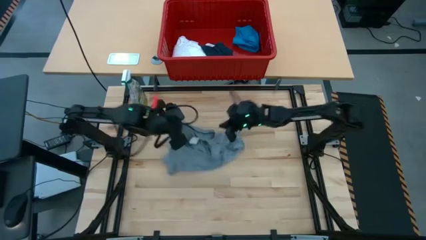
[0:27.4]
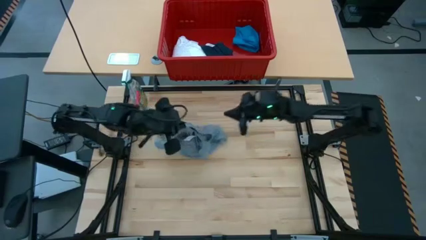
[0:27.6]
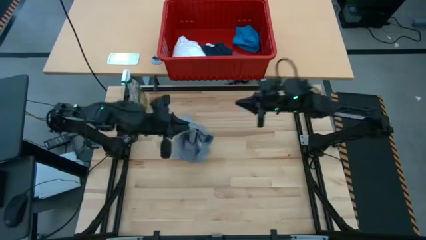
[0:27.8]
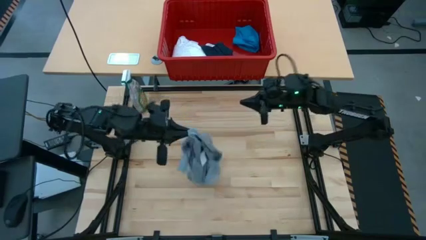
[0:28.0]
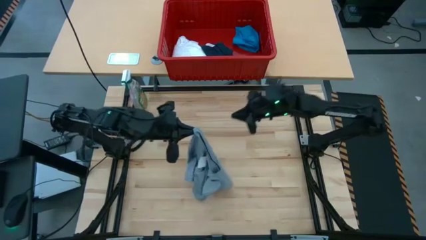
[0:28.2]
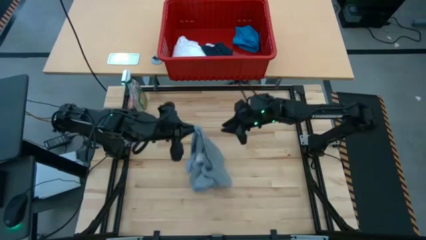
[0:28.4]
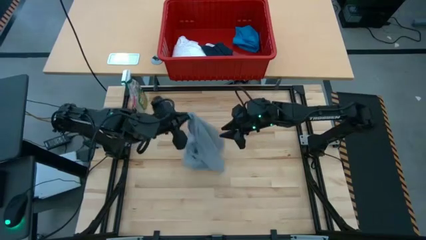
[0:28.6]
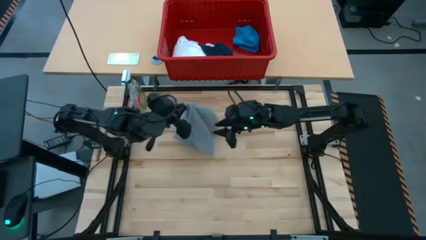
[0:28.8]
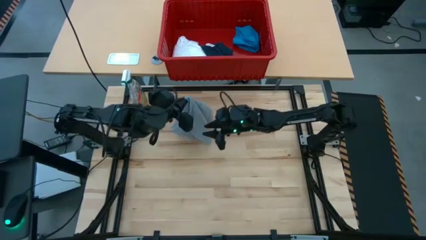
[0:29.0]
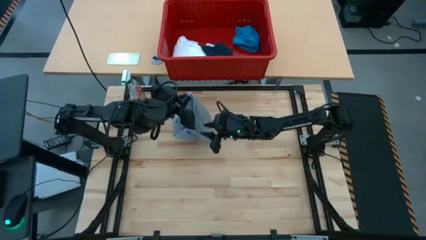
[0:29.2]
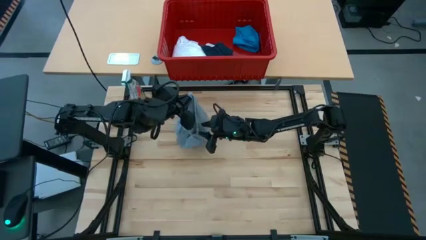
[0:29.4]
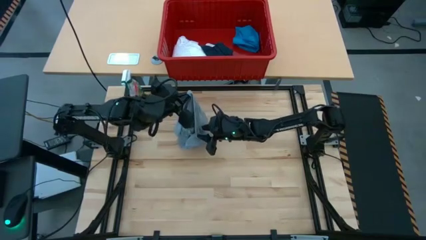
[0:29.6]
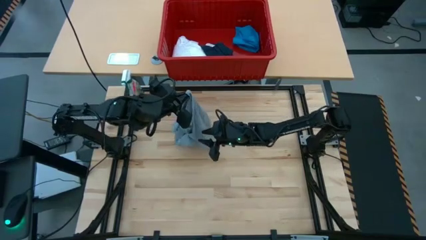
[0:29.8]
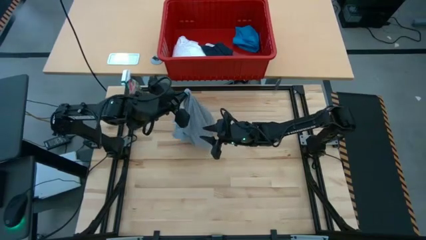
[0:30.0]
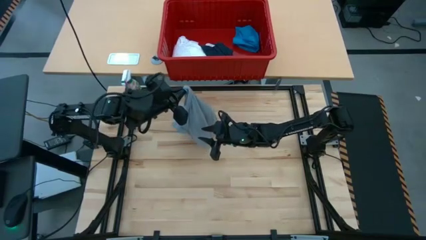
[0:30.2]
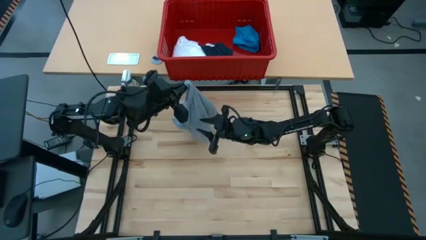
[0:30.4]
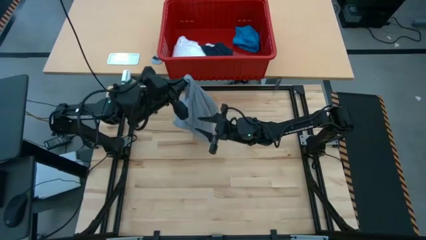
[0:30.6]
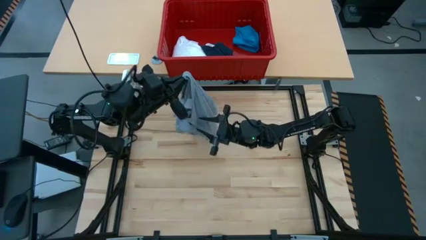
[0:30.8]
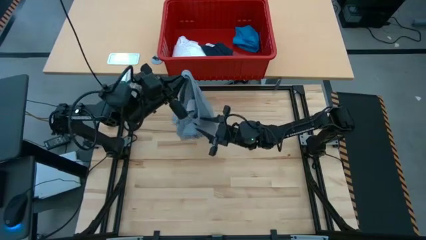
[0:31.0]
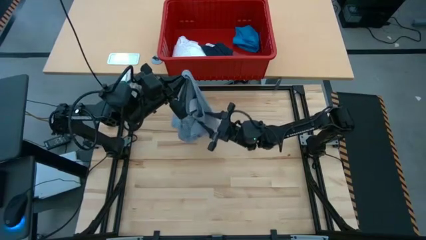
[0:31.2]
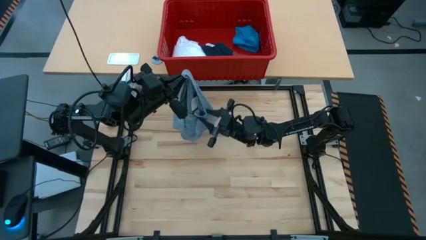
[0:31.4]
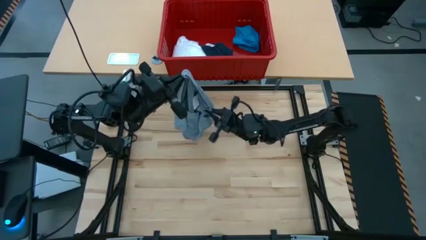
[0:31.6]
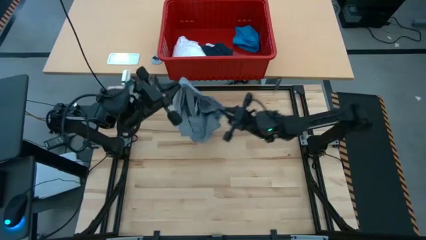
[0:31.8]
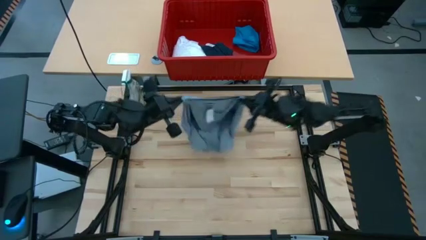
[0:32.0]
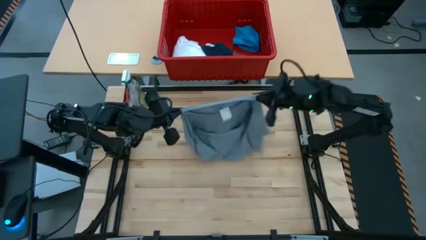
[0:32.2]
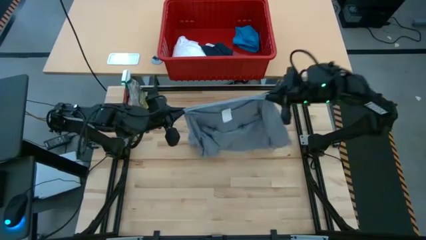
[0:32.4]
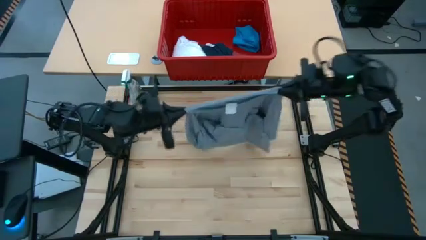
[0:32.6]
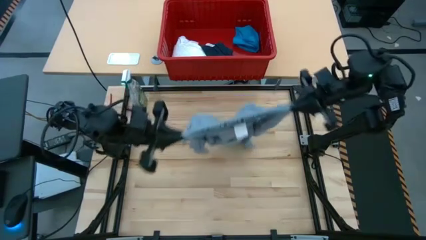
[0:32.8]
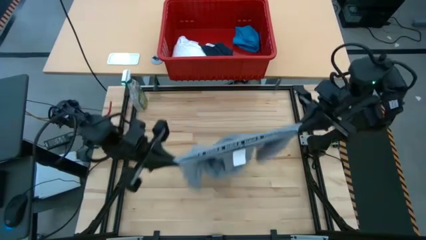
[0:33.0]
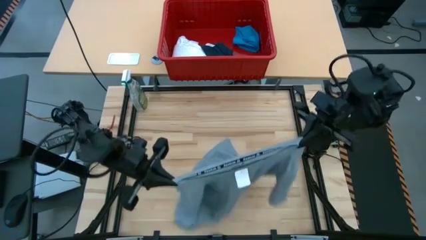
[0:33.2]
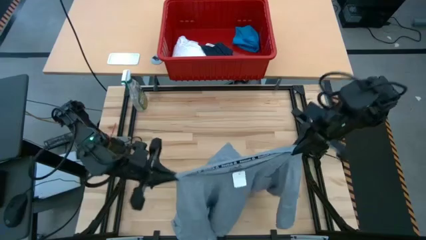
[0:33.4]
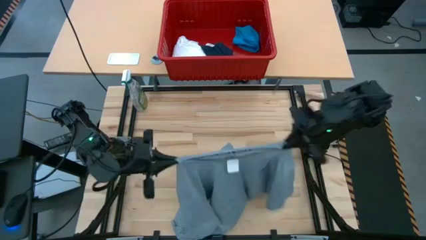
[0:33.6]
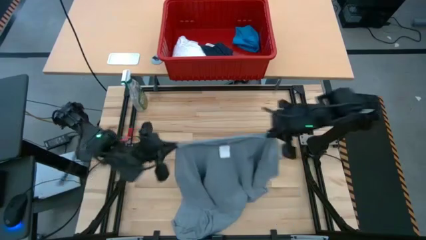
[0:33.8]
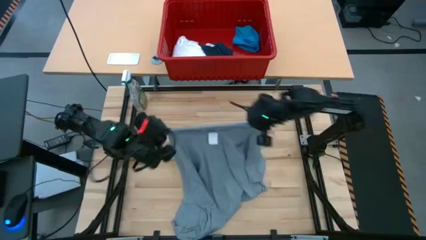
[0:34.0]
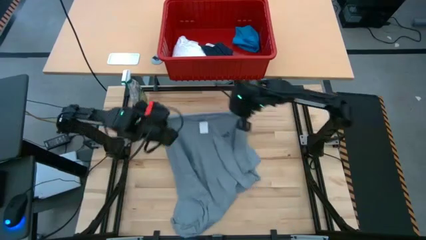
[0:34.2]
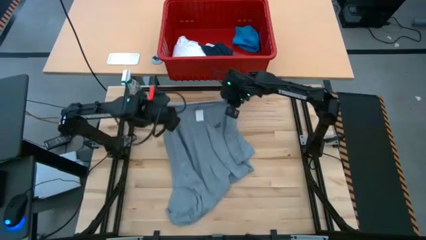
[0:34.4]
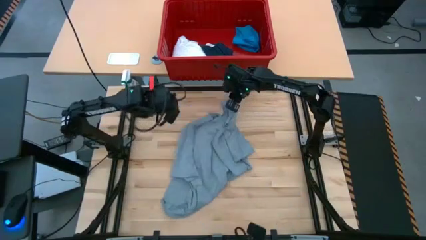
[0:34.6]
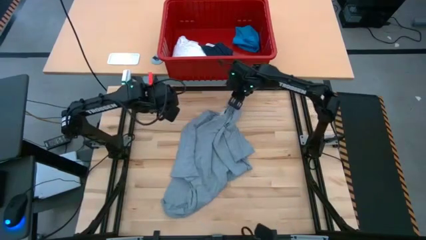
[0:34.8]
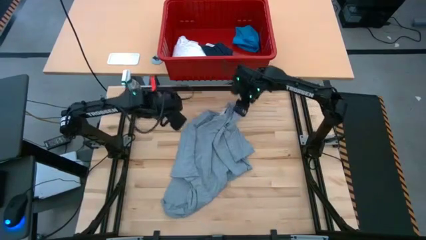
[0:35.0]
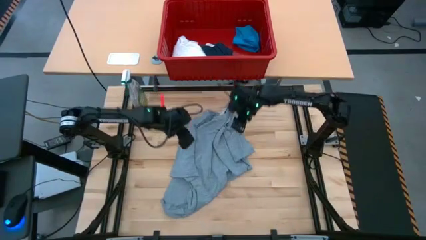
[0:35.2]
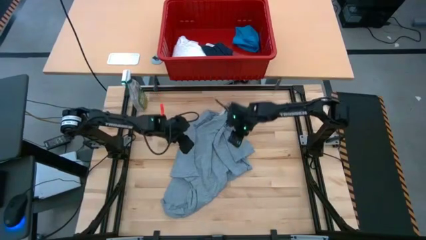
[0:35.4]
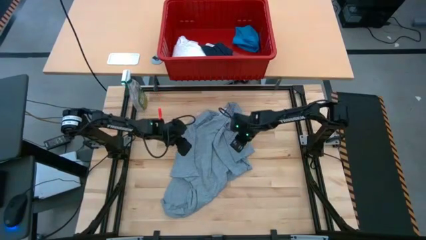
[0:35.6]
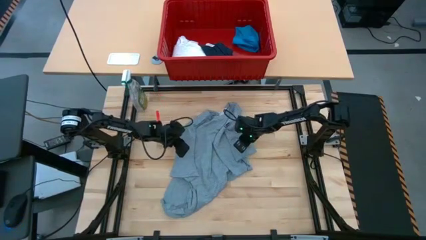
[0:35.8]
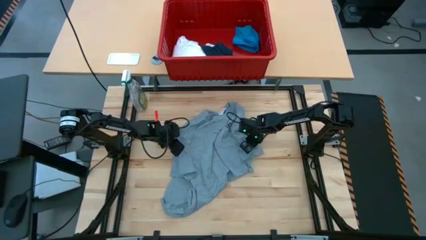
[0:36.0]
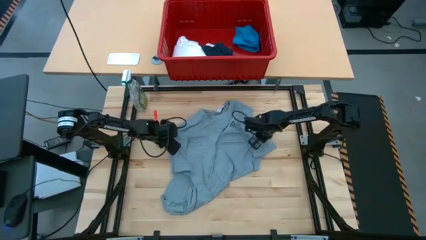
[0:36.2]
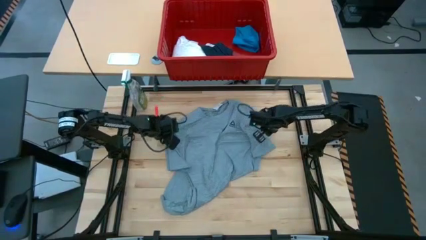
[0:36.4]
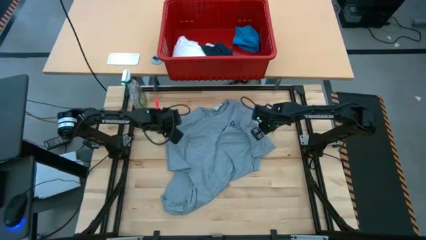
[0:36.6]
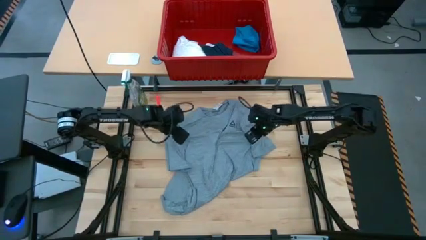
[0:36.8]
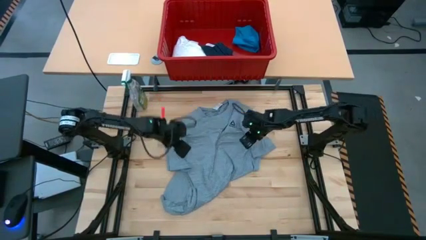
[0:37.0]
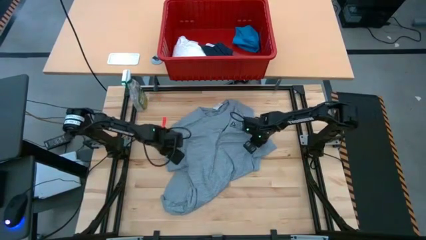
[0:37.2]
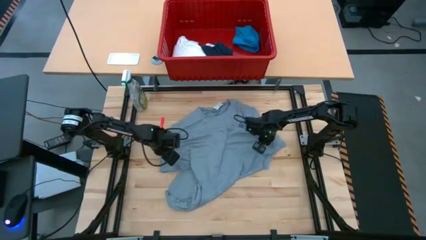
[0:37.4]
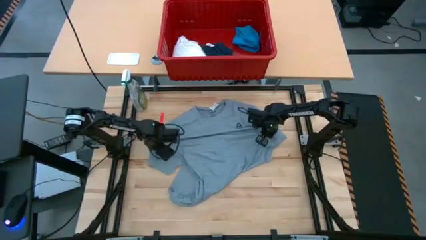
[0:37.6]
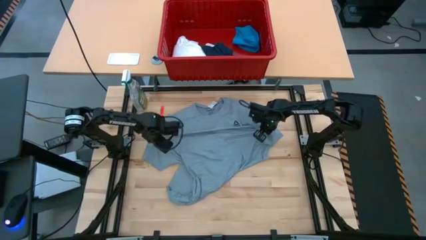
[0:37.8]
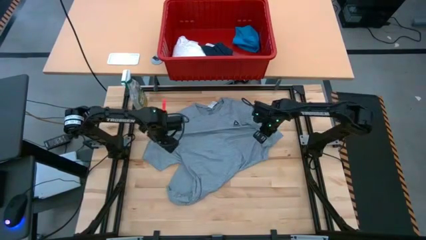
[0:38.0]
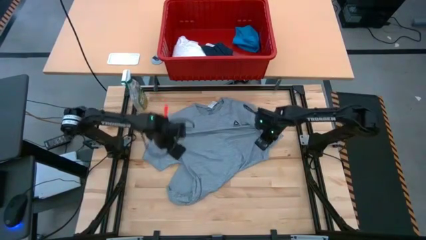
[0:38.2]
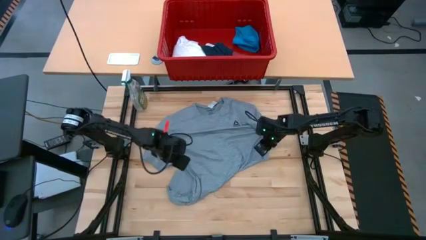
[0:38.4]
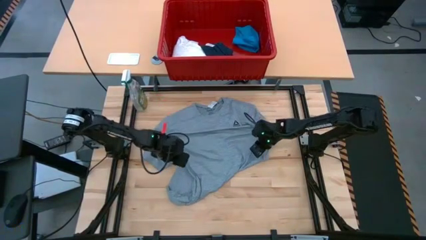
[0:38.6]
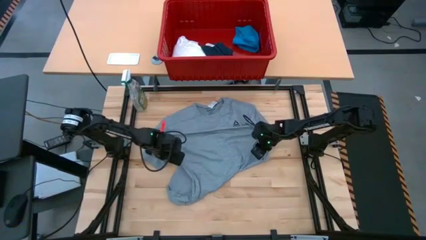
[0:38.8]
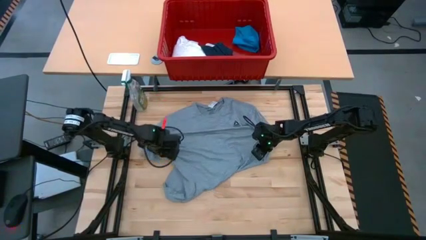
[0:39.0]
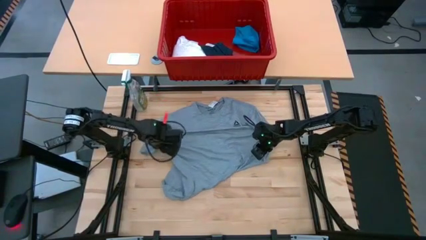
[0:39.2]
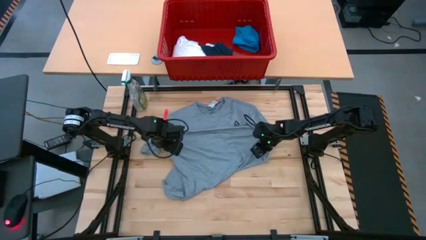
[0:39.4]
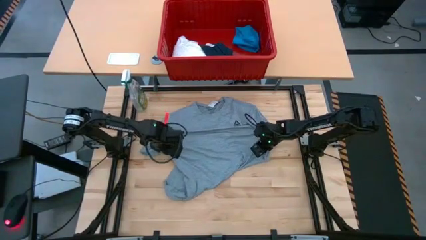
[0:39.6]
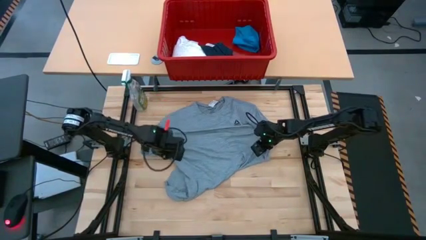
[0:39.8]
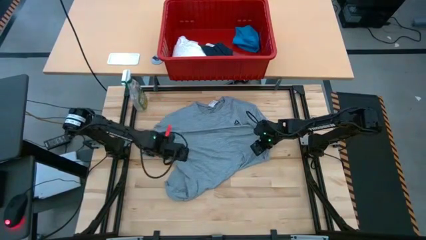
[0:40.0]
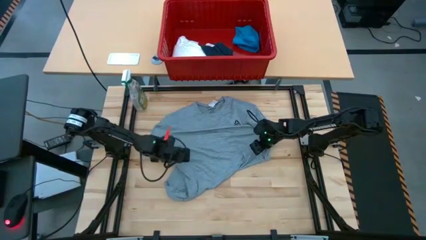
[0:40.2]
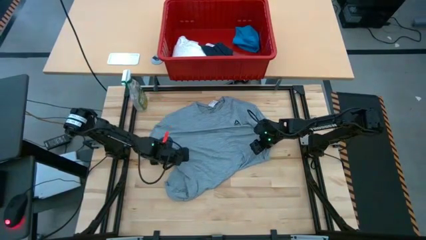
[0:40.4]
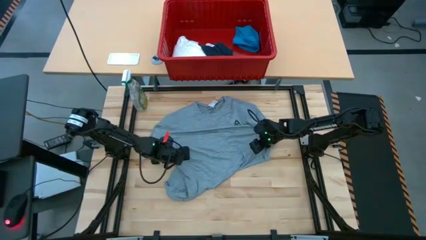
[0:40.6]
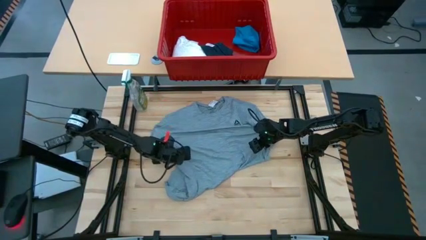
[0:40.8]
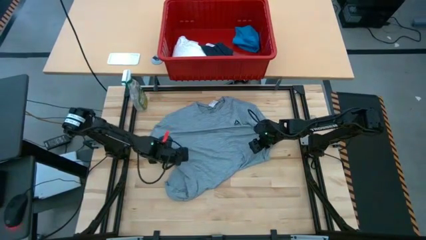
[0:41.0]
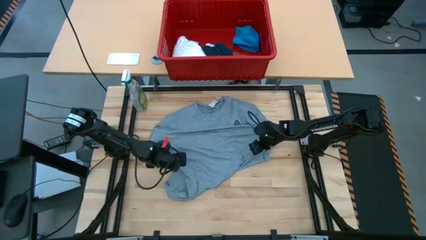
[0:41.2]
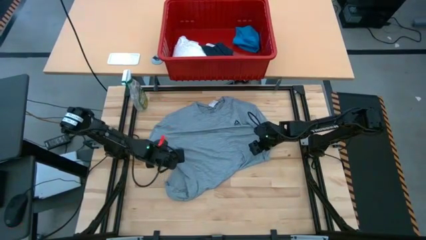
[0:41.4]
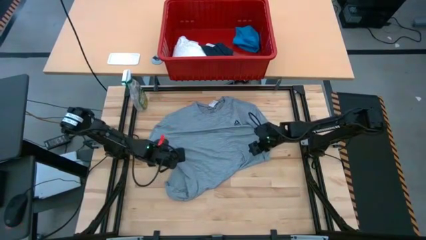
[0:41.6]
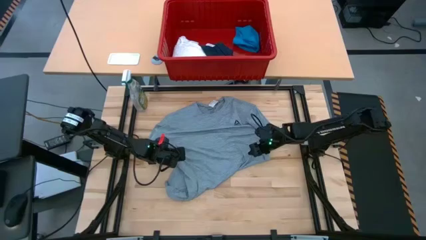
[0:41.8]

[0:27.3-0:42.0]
Task: Fold laundry
Fold the gray shirt
